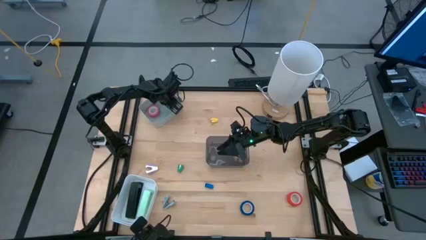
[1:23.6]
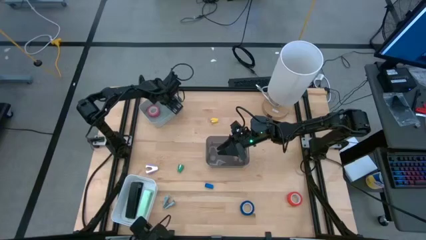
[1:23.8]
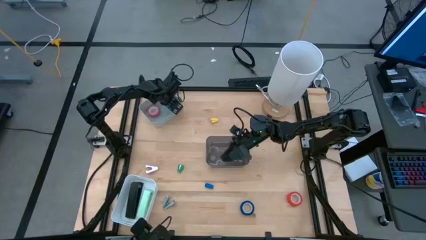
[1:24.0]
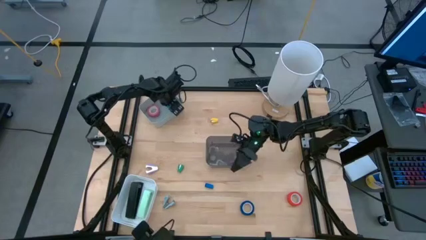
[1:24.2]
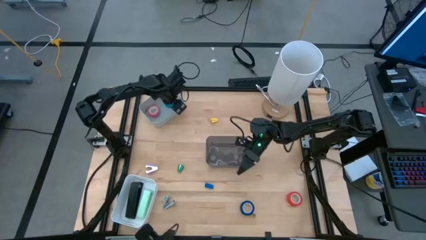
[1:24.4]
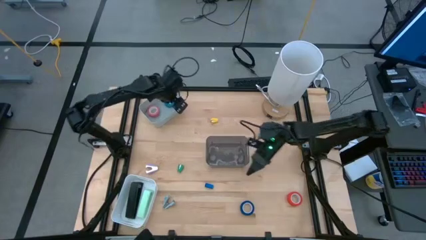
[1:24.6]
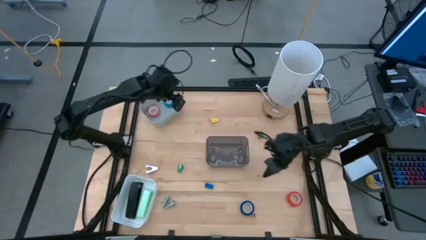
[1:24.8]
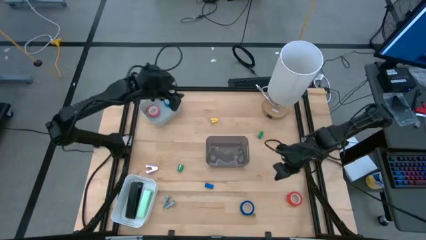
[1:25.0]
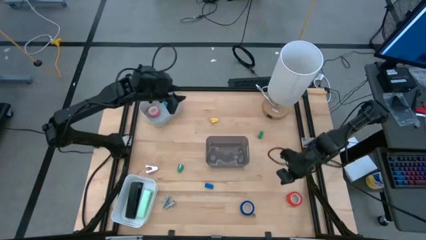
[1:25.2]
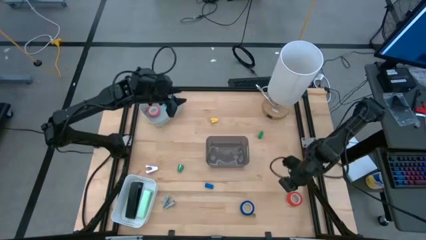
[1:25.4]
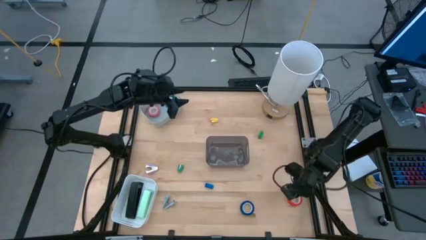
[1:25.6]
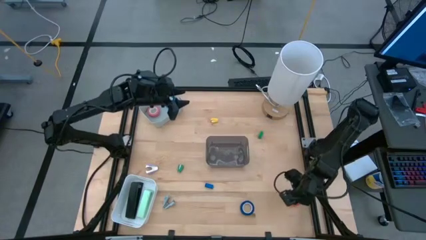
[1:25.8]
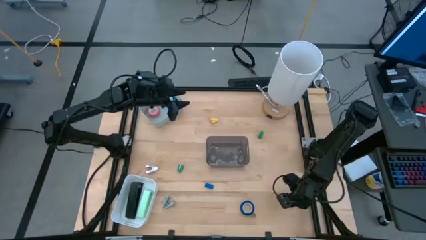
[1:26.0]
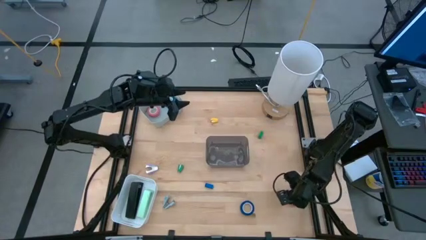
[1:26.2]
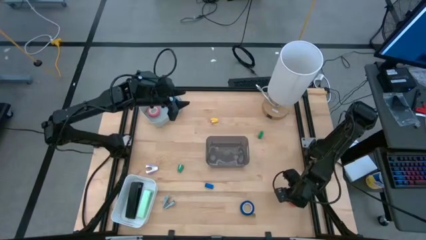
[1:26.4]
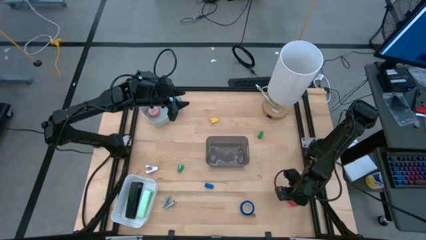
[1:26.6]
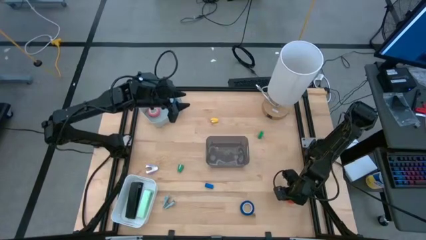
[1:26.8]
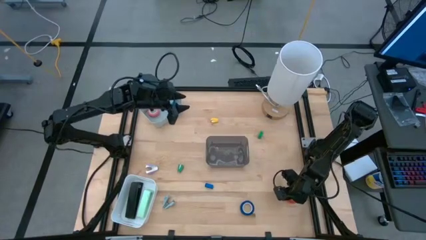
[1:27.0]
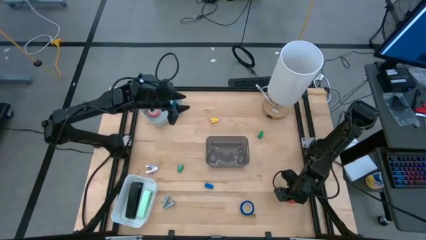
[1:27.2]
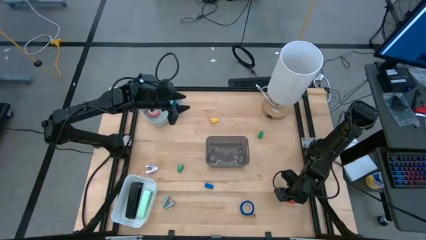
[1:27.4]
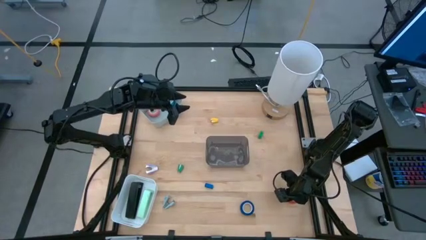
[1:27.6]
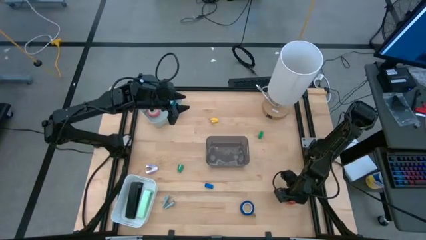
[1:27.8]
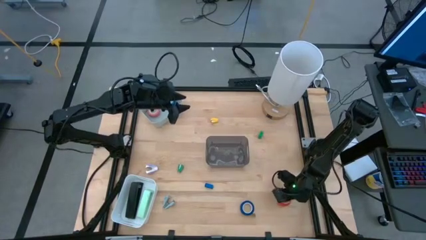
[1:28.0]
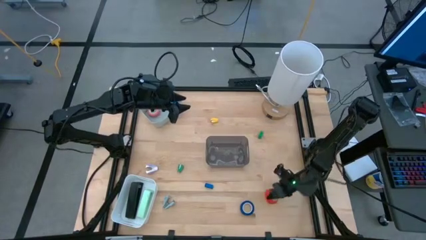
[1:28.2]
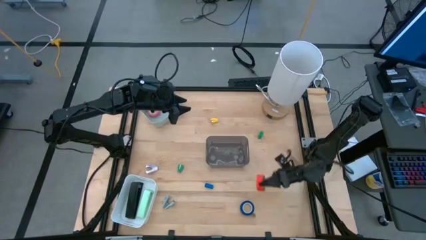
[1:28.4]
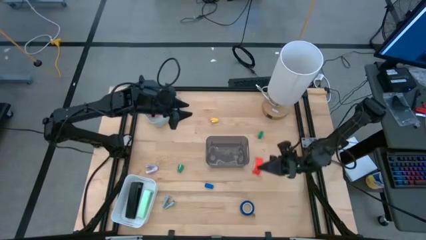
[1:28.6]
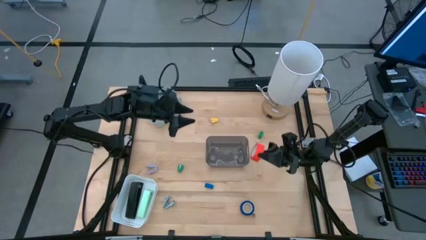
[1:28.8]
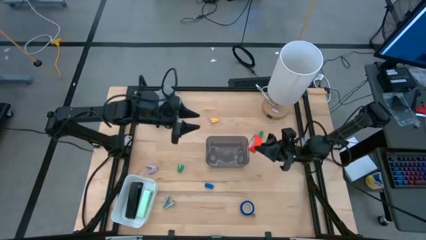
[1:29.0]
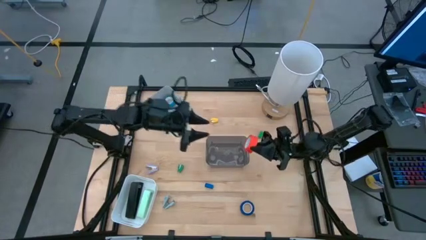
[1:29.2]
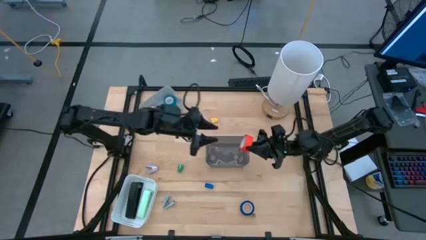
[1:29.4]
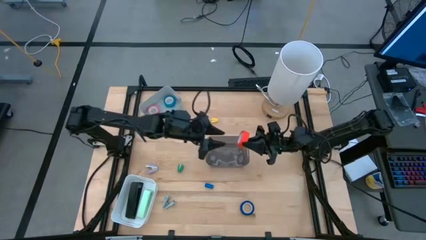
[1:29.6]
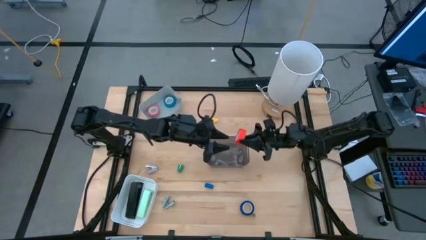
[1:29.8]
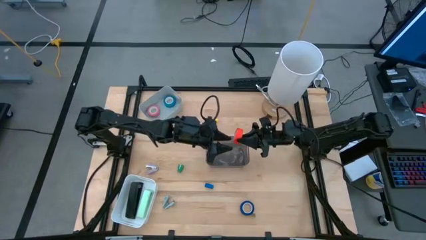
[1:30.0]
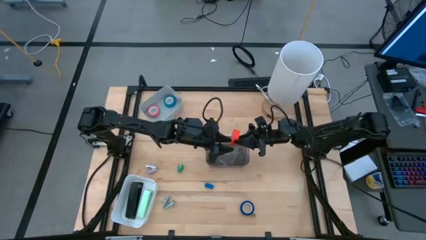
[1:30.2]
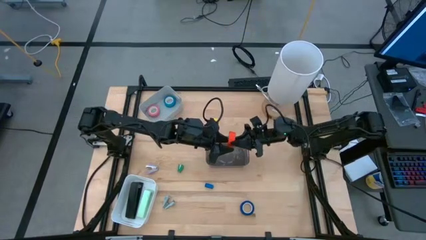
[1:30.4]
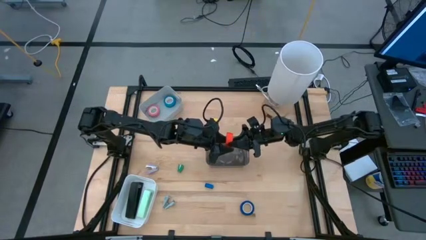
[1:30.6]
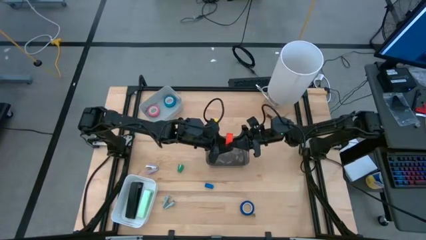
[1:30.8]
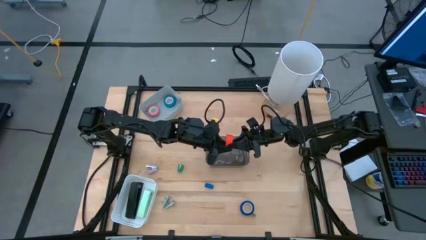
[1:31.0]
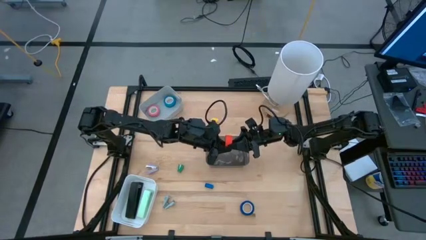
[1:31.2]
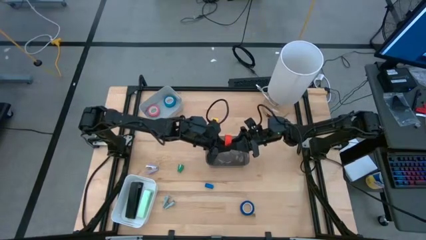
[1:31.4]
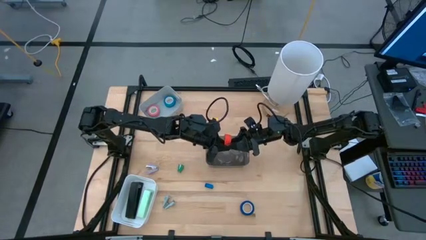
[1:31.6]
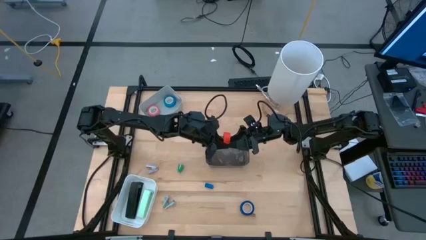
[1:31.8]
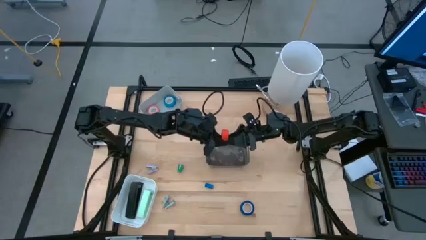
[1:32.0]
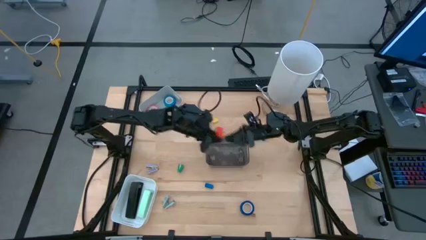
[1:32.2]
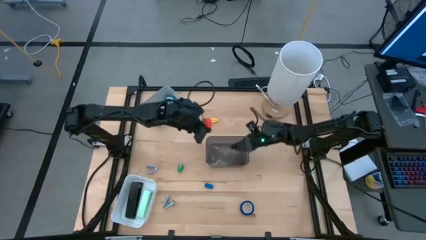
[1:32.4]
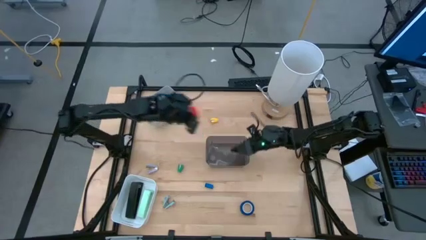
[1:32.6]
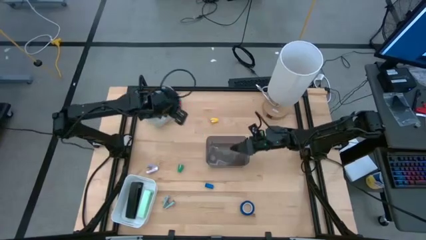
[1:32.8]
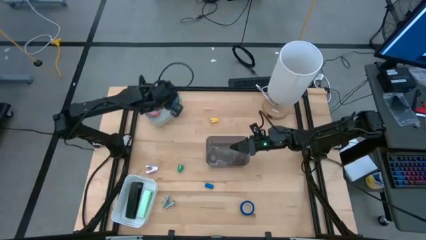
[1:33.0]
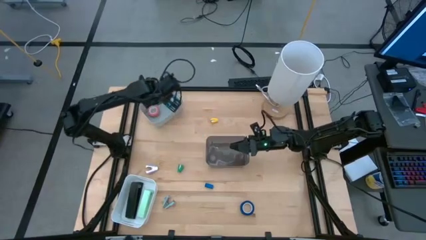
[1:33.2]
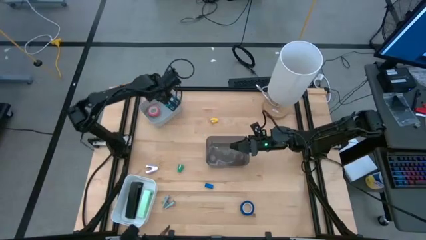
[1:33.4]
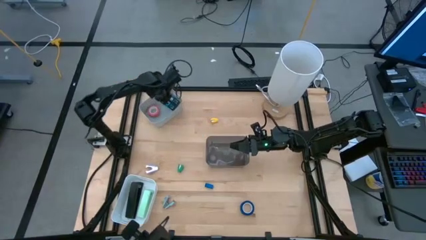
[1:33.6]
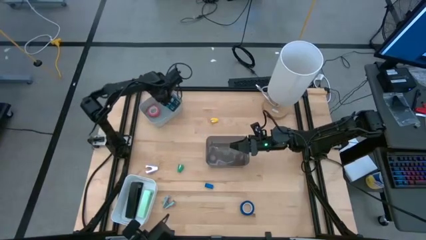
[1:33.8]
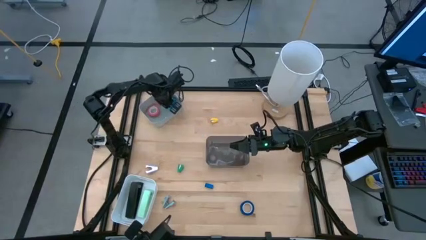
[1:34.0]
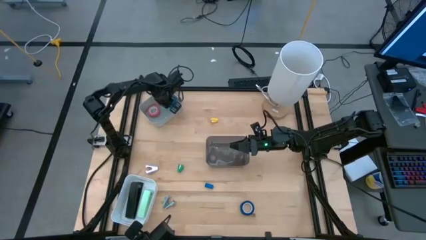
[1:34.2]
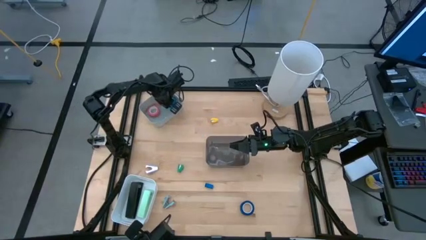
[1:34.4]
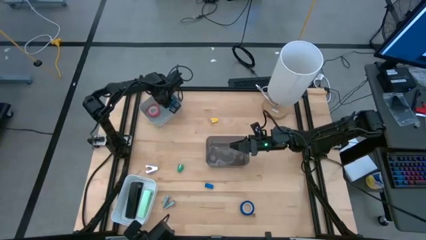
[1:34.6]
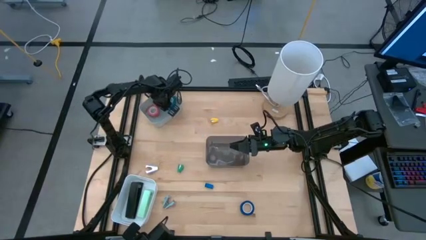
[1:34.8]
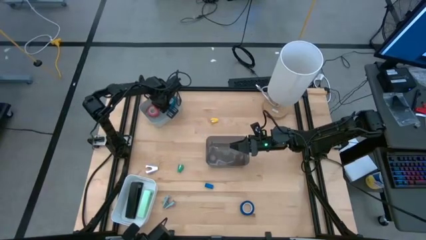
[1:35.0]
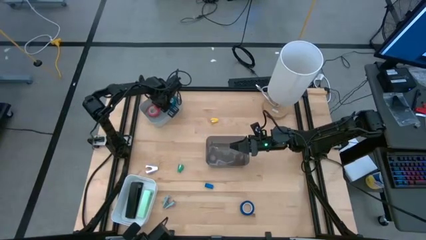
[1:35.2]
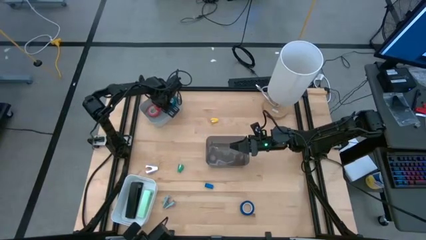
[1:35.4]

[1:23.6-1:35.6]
Task: Pick and place Stapler, Stapler remover, tape
Put the orange tape into the grey bin

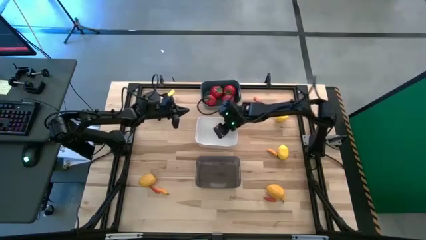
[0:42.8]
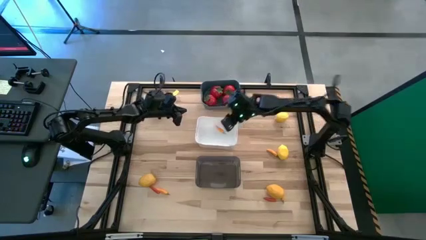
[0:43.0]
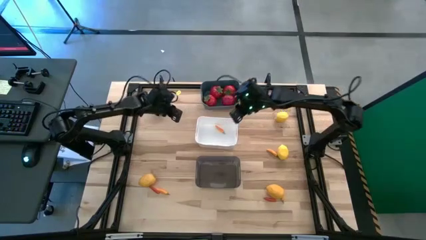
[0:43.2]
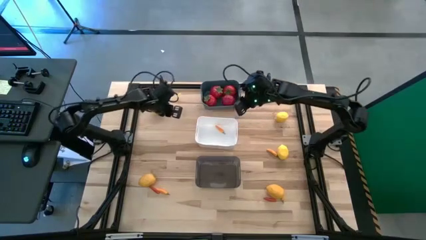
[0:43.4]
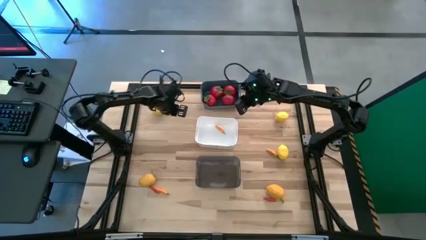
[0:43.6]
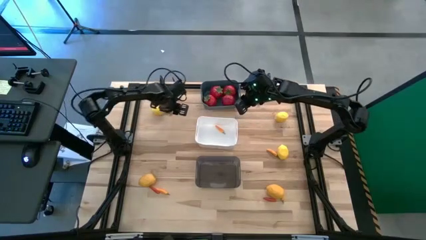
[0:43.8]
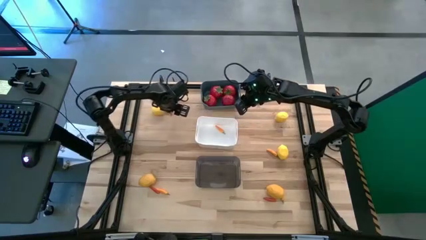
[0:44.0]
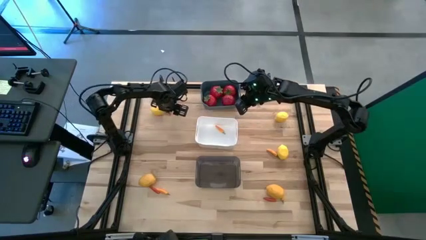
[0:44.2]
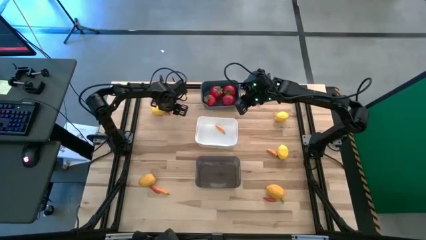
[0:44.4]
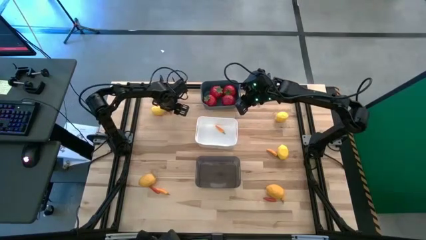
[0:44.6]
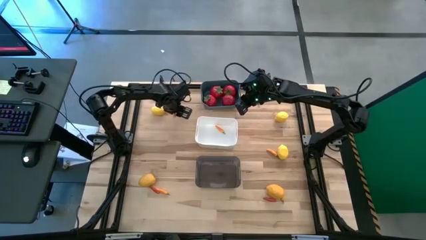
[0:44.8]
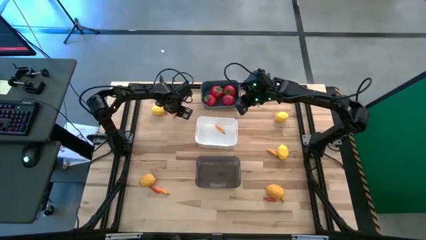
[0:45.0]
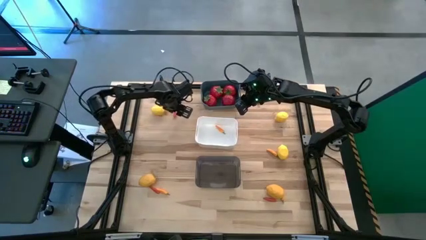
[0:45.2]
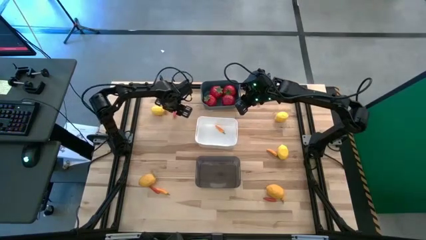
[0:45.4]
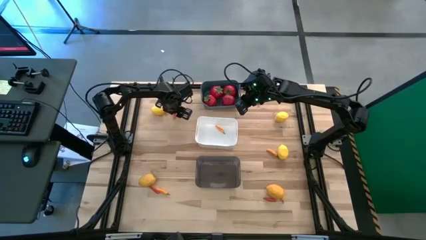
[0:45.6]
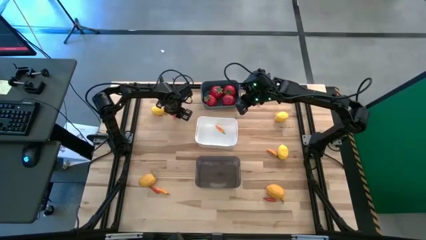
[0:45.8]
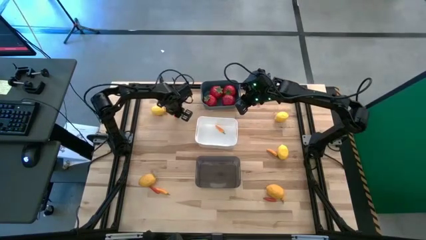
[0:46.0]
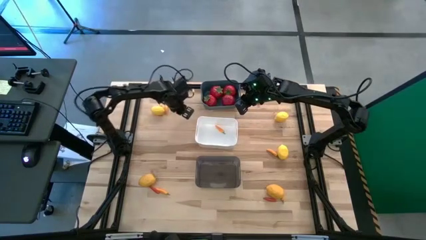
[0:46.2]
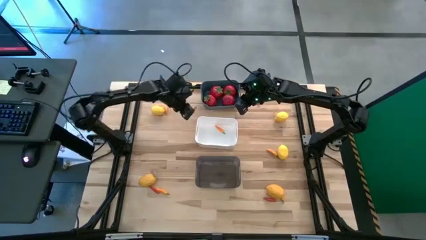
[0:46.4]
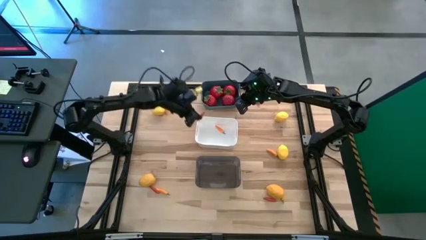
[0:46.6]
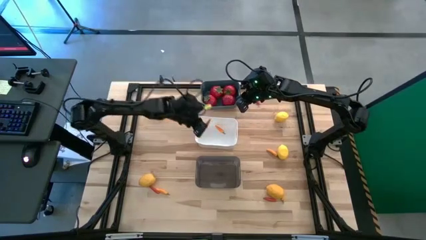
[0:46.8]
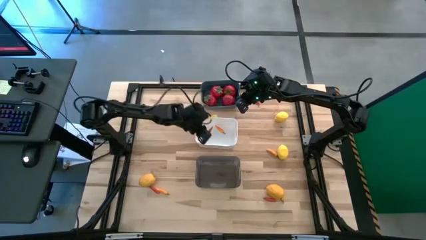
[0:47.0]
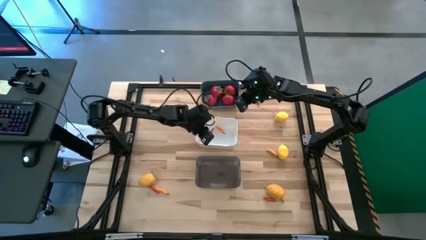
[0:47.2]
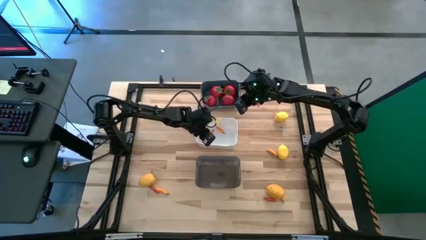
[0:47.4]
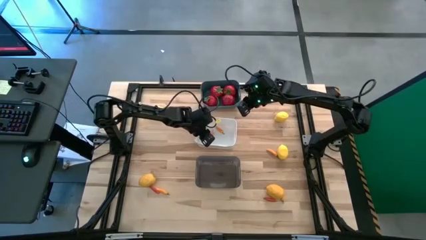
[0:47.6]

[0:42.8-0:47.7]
Task: Sort produce into baskets
Put the red chili pepper into the white bin
